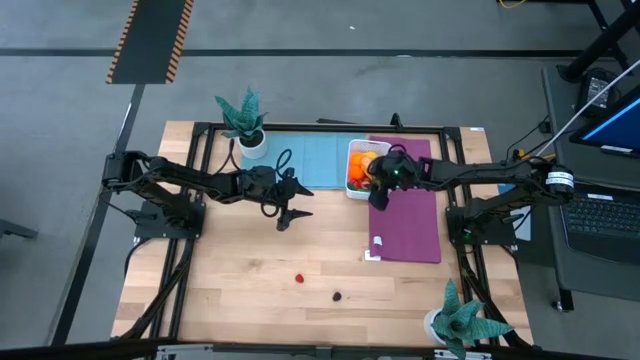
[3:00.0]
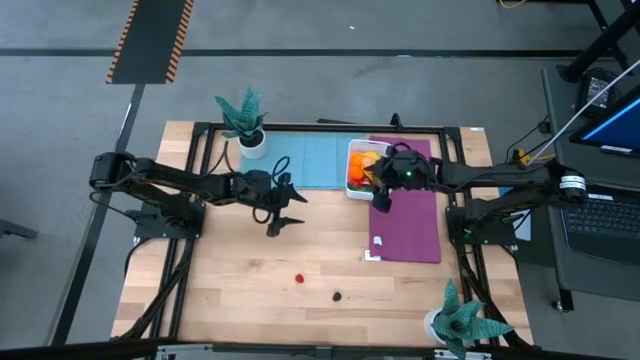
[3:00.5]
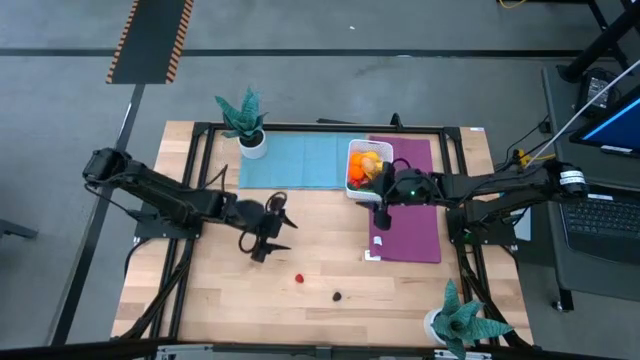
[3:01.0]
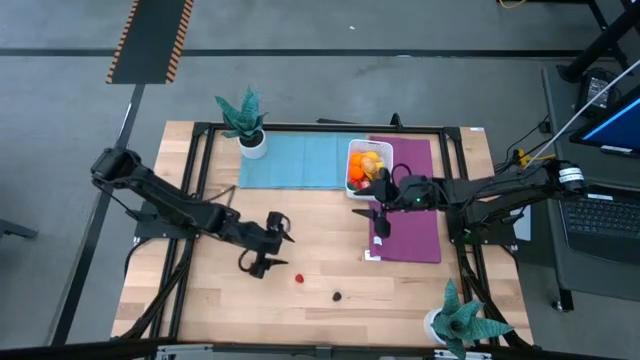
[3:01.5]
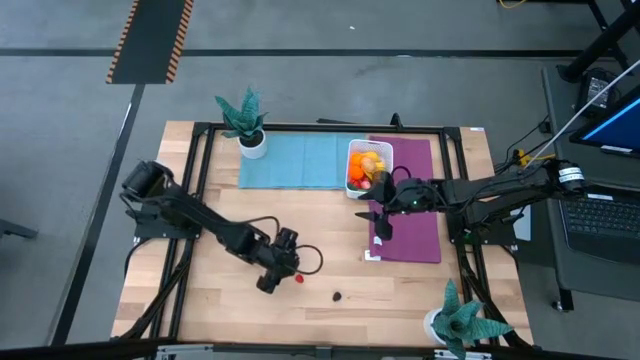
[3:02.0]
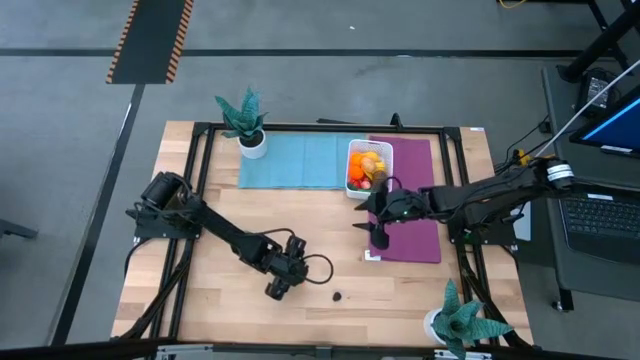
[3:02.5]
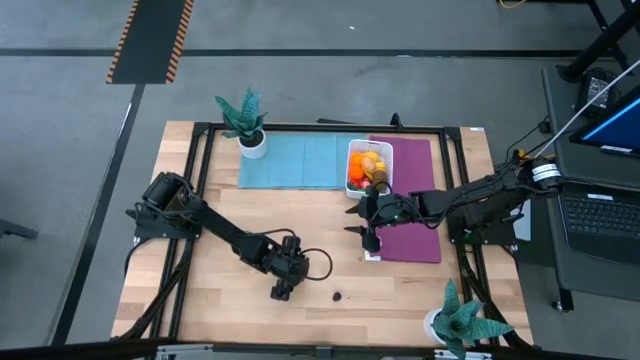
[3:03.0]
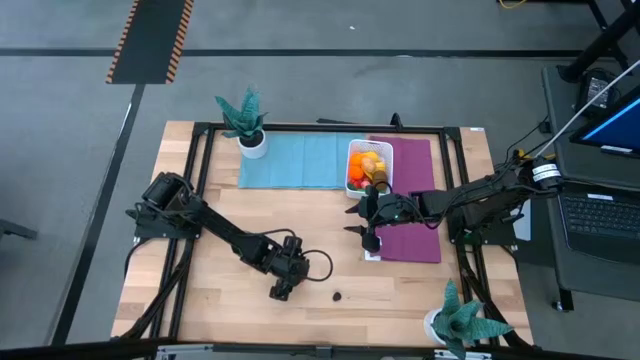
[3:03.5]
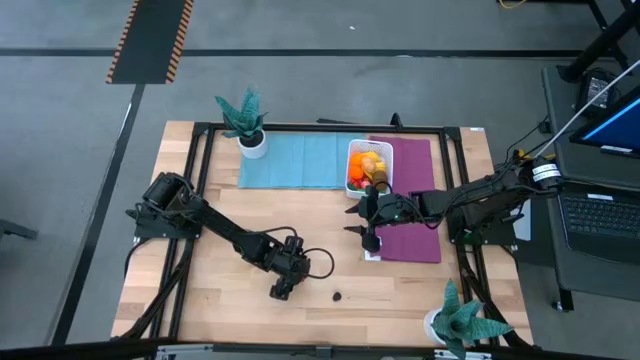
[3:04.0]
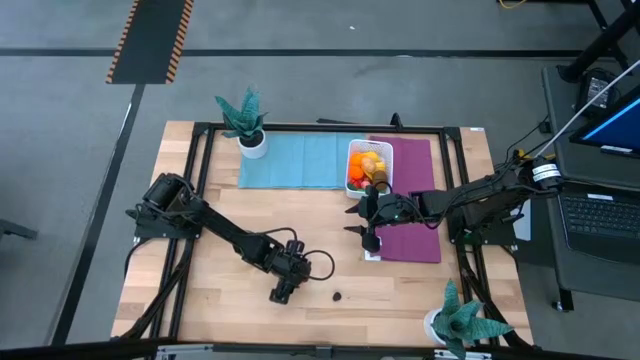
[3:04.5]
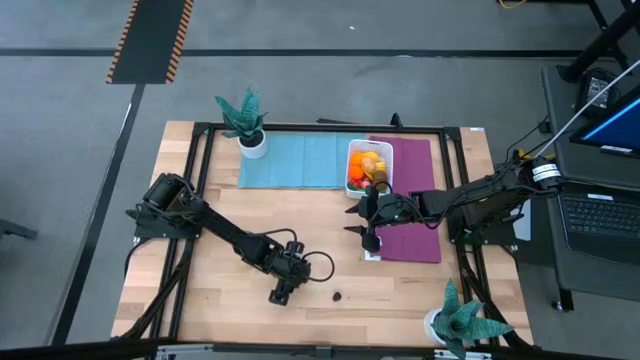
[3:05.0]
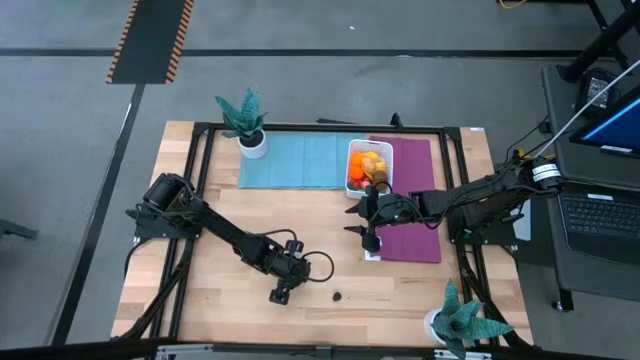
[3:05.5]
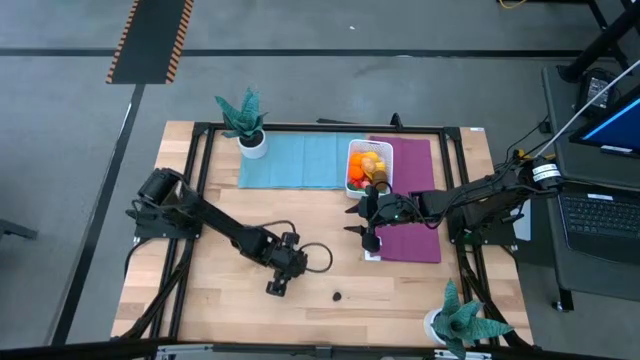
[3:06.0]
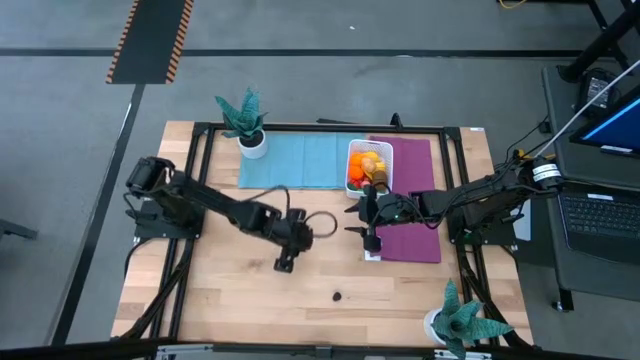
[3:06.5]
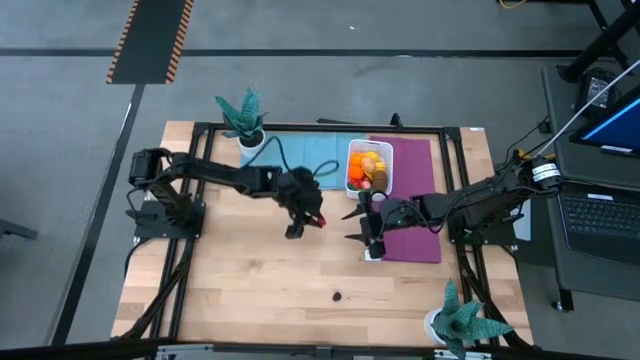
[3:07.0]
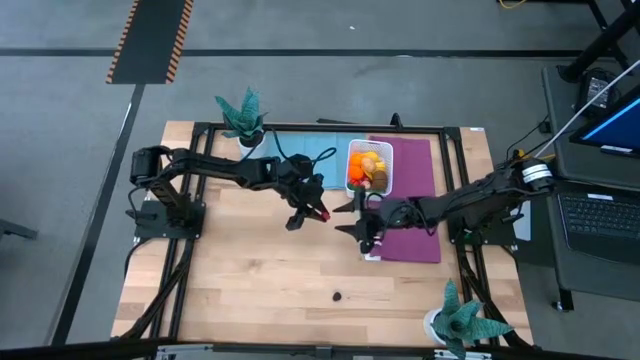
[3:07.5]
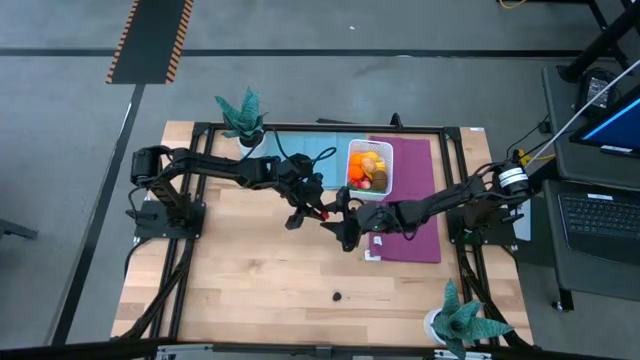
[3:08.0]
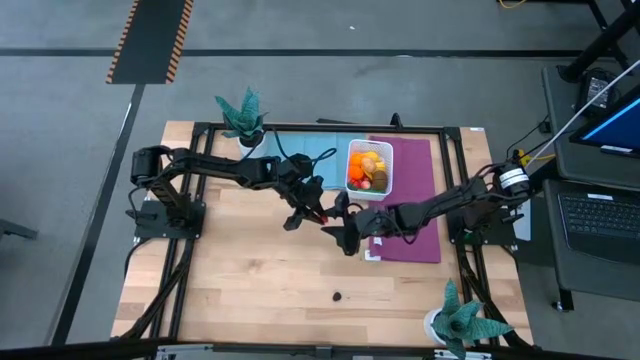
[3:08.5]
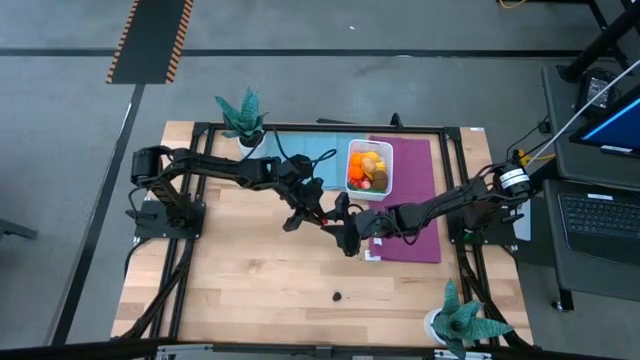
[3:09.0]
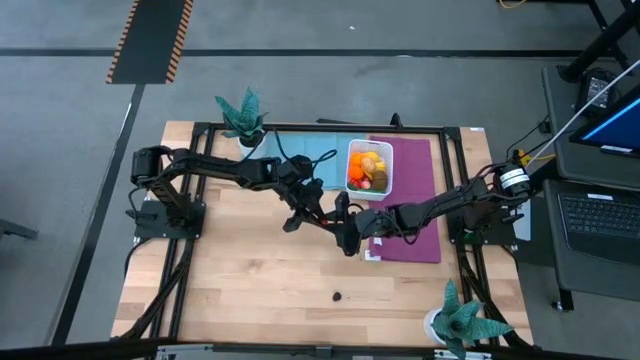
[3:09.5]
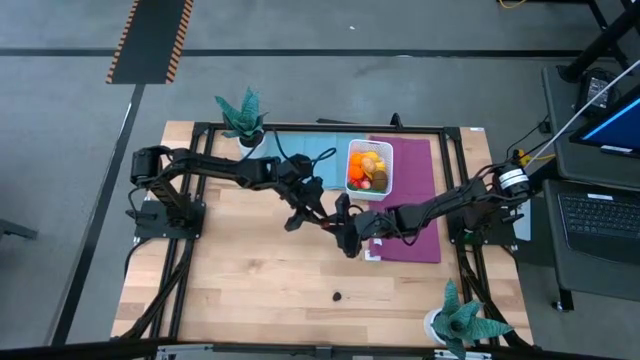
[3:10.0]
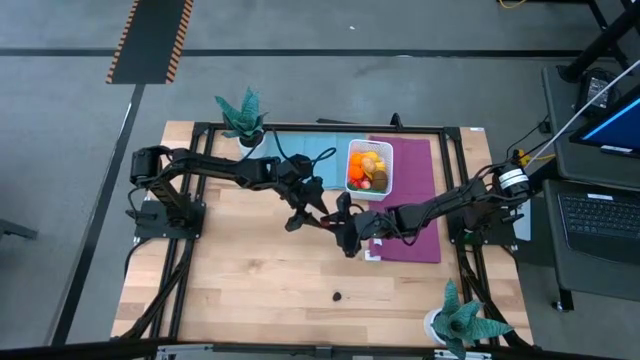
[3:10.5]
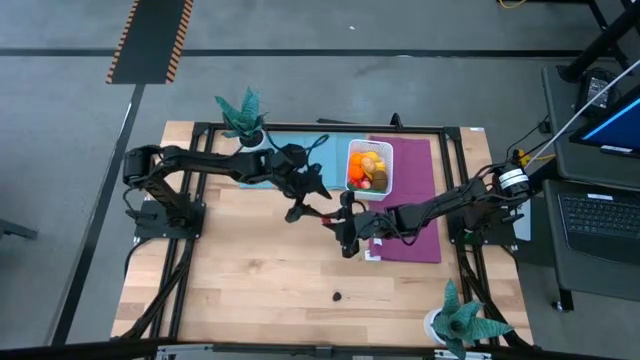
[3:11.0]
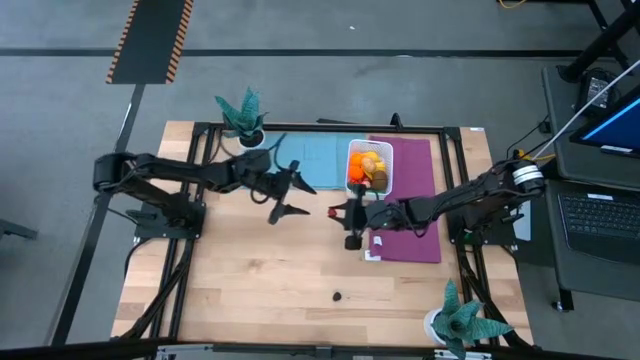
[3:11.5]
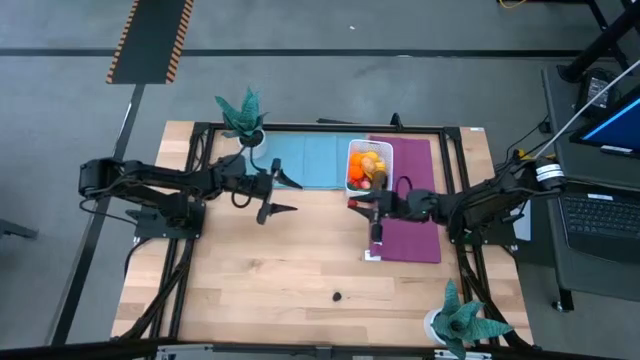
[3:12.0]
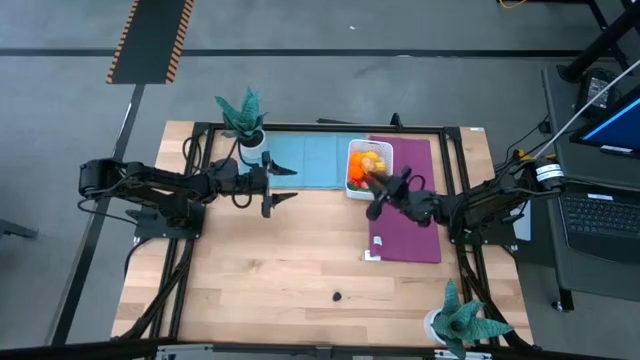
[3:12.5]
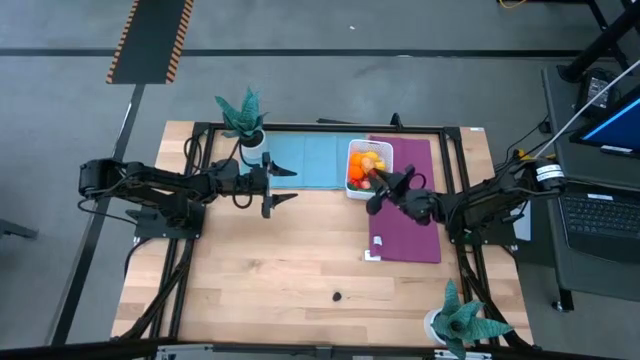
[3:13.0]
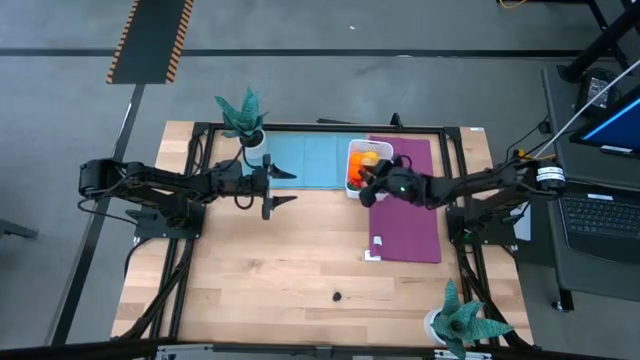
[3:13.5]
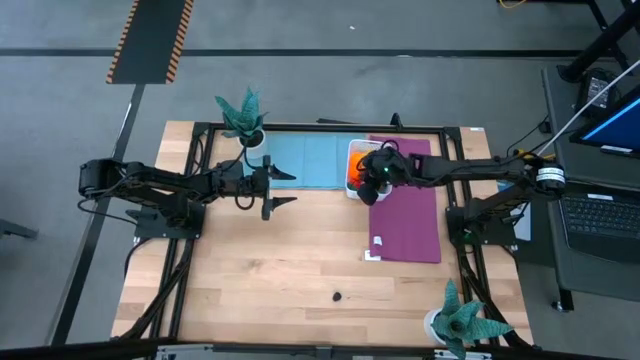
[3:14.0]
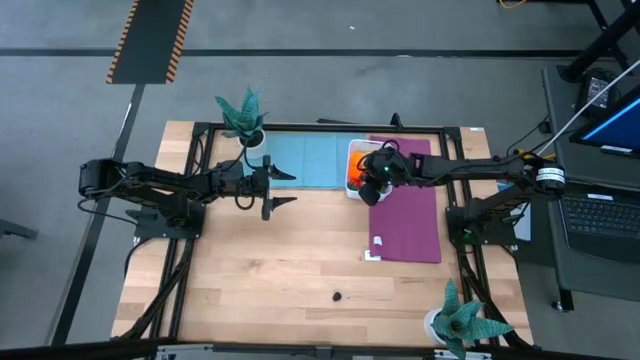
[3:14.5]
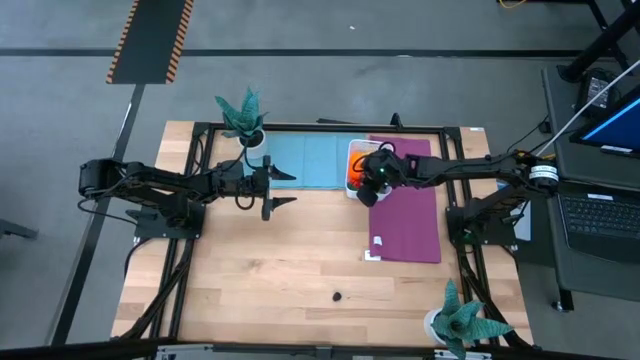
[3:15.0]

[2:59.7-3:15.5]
Task: Pick and placing Produce into tupperware
Put the red raspberry into the white container

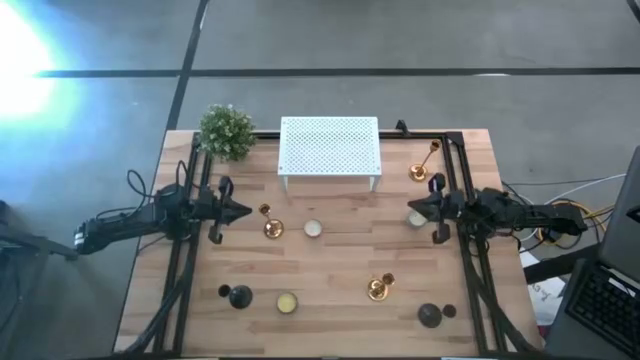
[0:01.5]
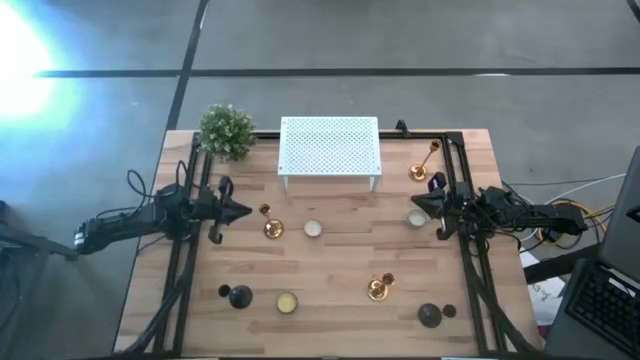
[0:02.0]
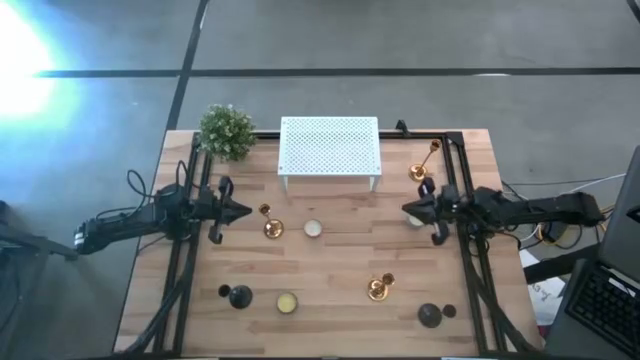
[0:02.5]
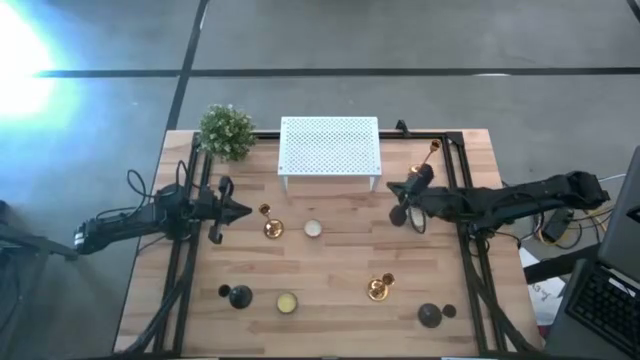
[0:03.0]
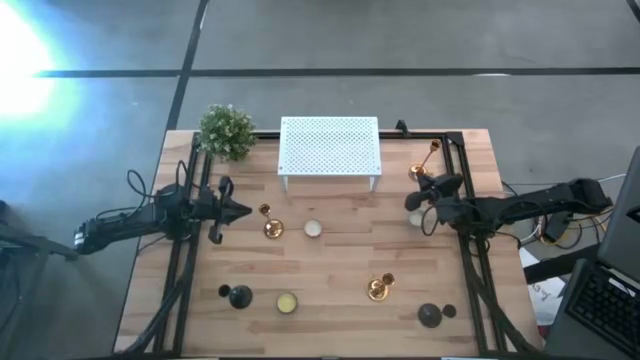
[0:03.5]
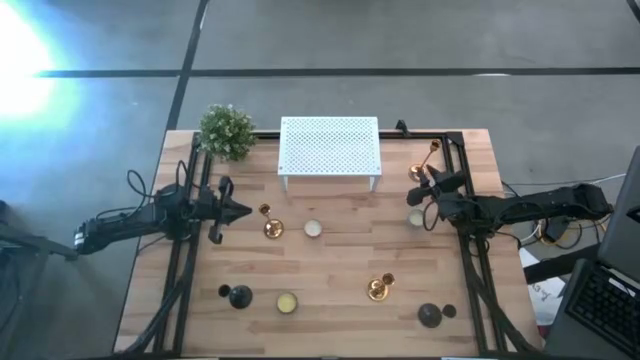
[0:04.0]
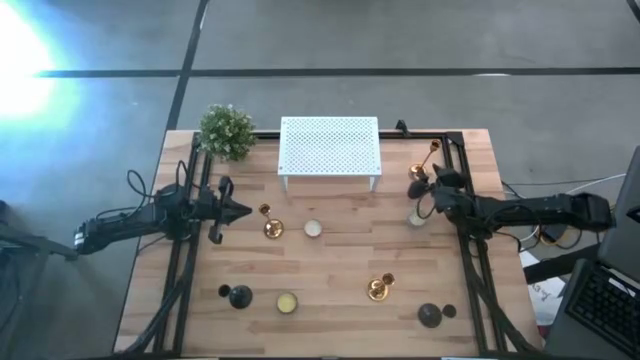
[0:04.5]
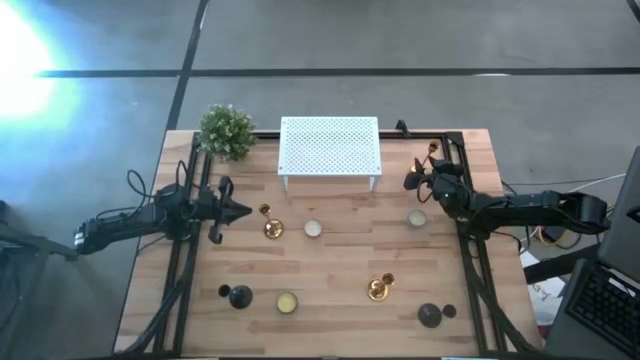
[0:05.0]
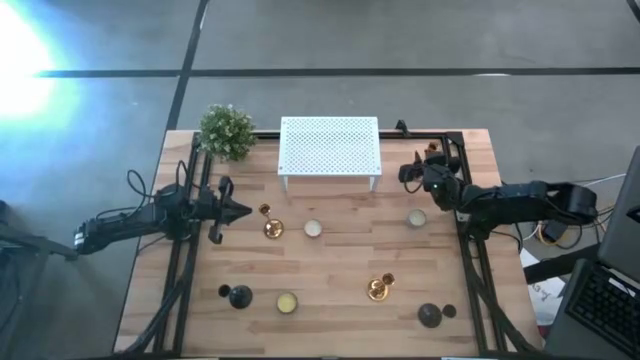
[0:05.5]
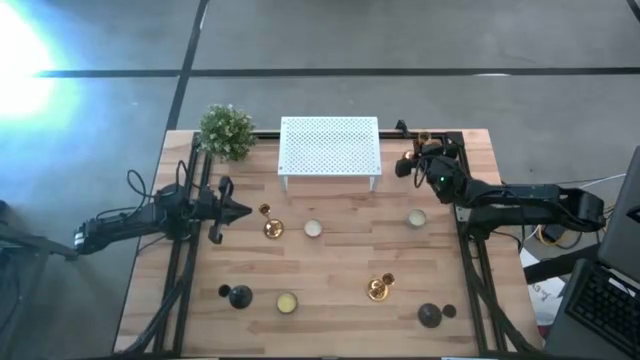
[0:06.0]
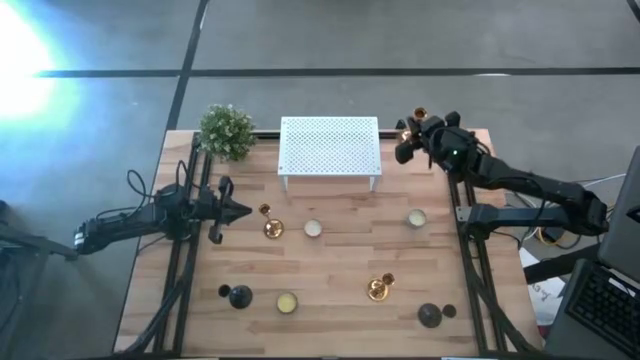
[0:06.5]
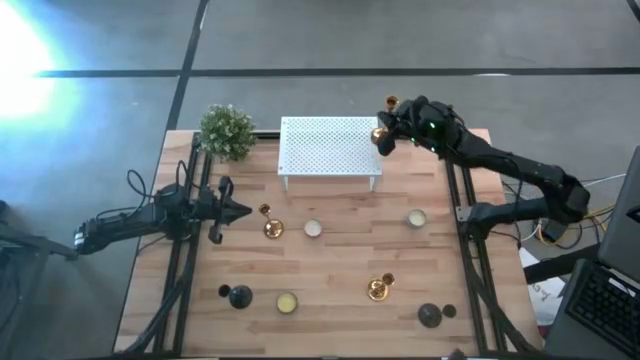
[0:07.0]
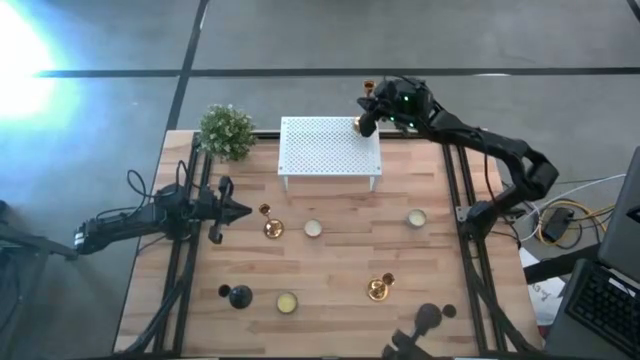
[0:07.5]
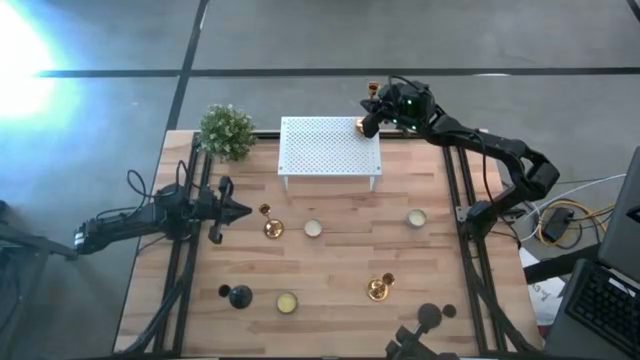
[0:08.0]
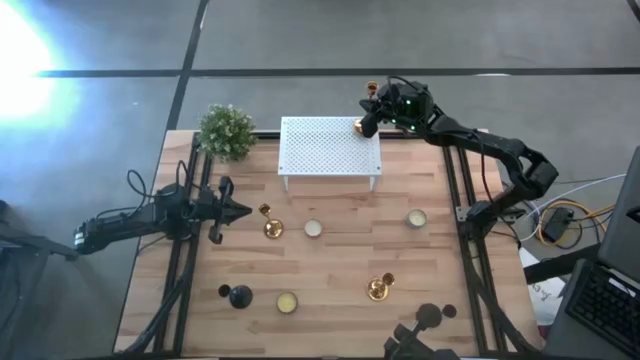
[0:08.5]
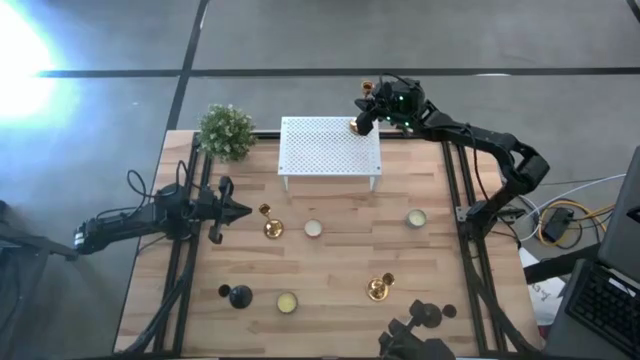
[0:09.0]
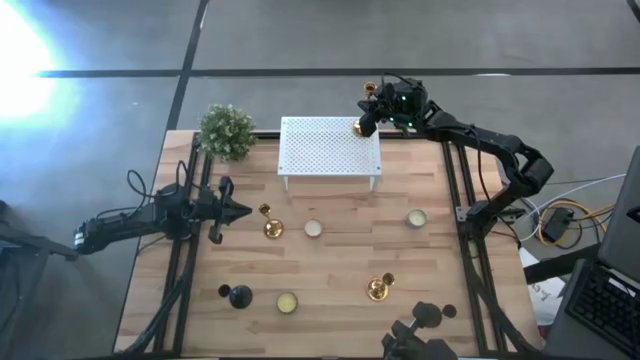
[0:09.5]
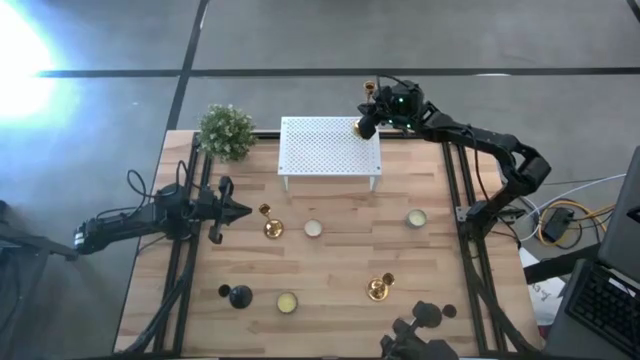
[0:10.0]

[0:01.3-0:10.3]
Task: Pick & Place candle stick holders
Put the top golden candle holder on the shelf
